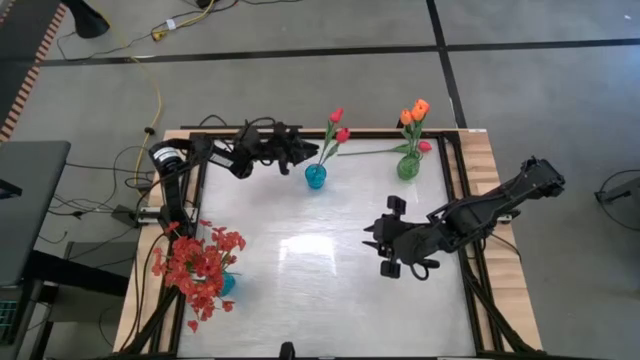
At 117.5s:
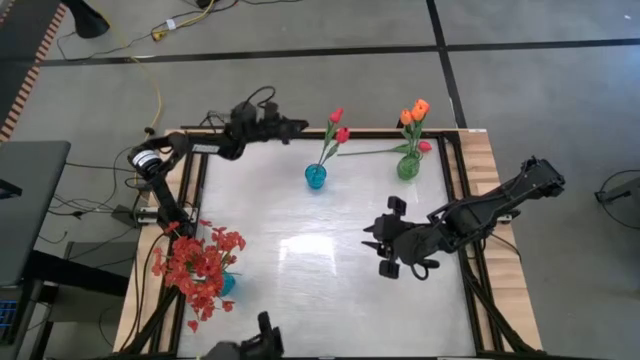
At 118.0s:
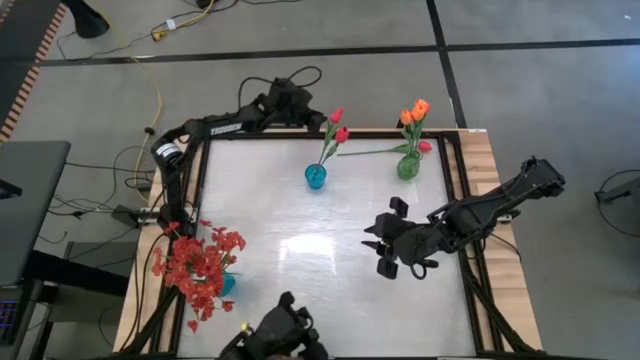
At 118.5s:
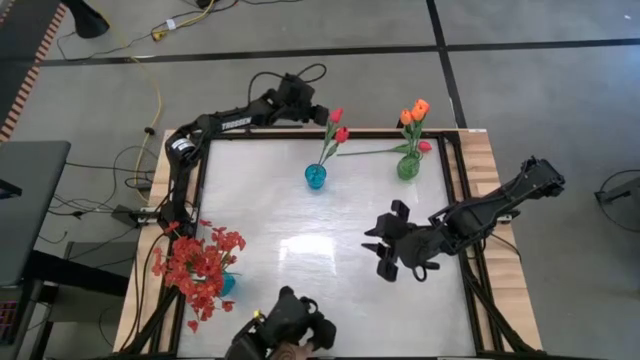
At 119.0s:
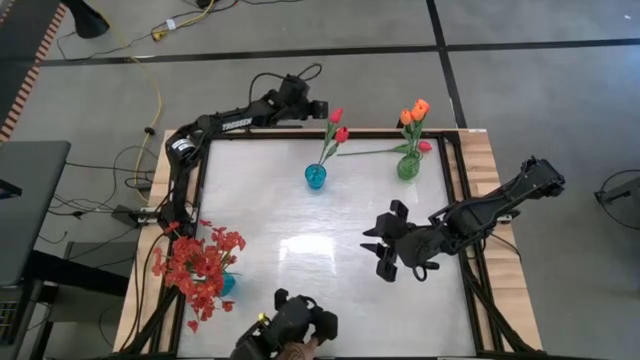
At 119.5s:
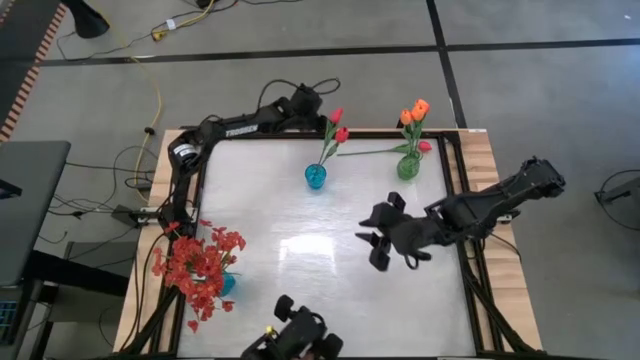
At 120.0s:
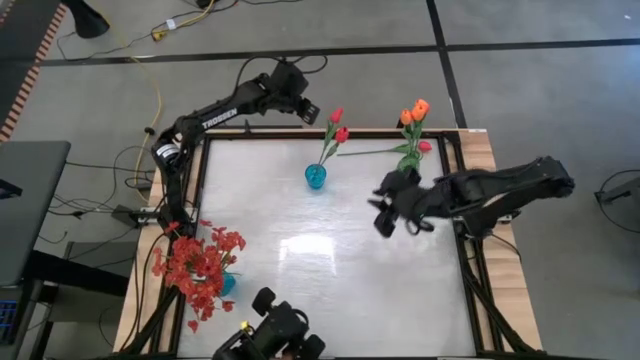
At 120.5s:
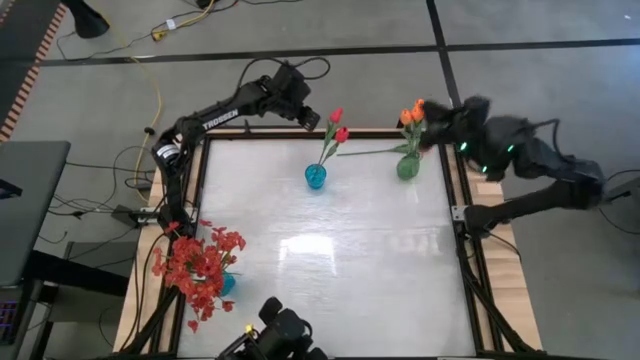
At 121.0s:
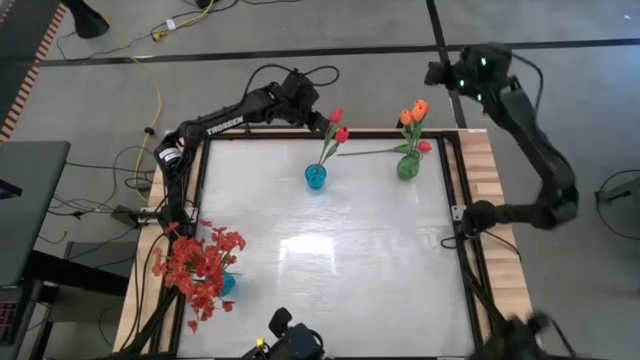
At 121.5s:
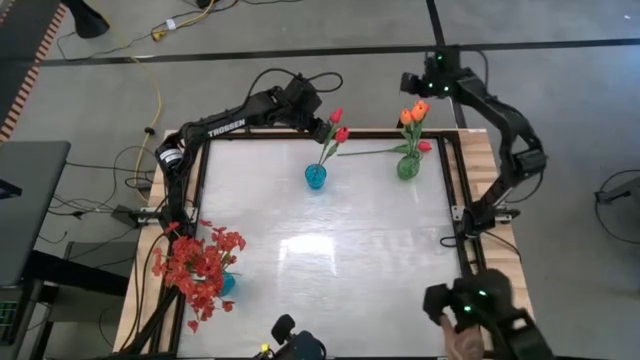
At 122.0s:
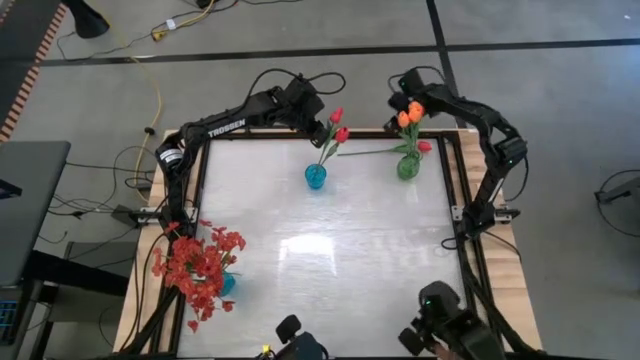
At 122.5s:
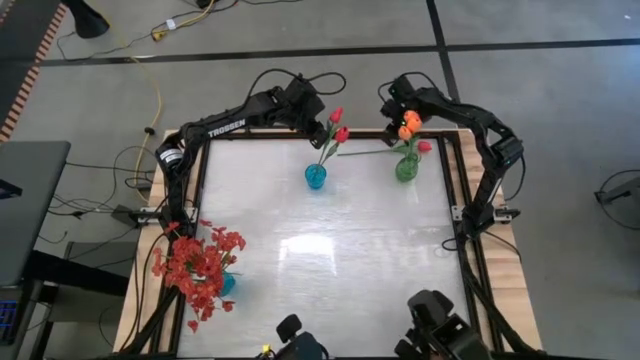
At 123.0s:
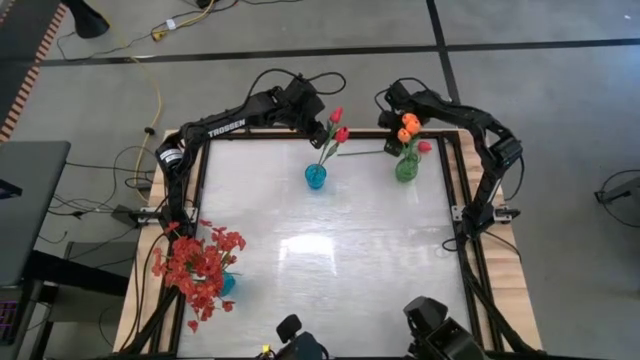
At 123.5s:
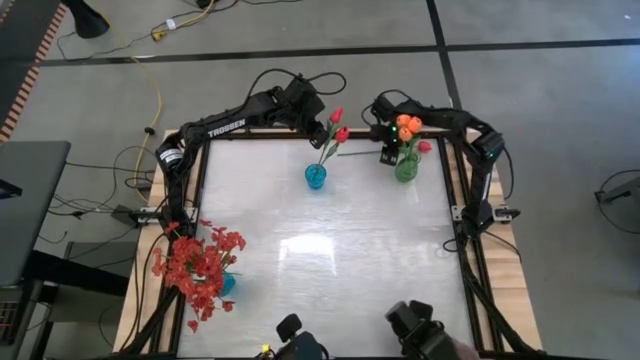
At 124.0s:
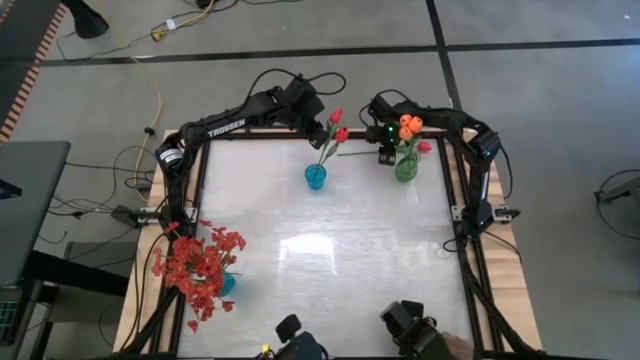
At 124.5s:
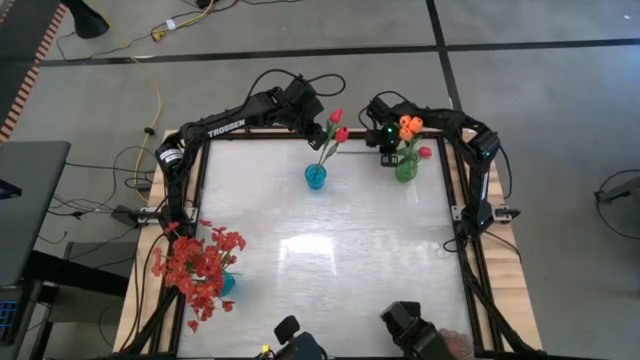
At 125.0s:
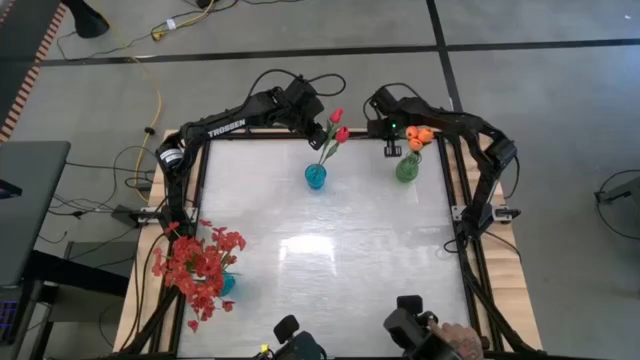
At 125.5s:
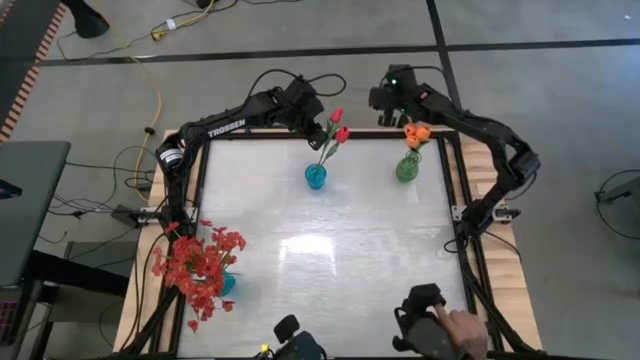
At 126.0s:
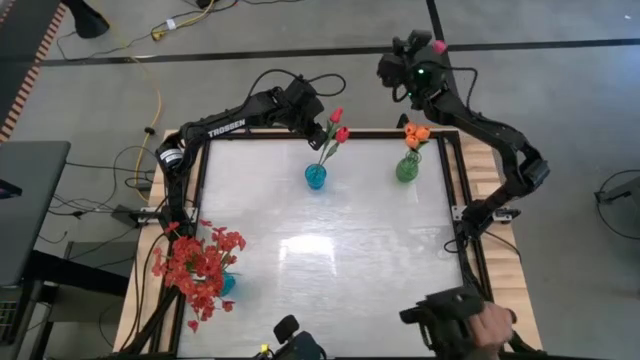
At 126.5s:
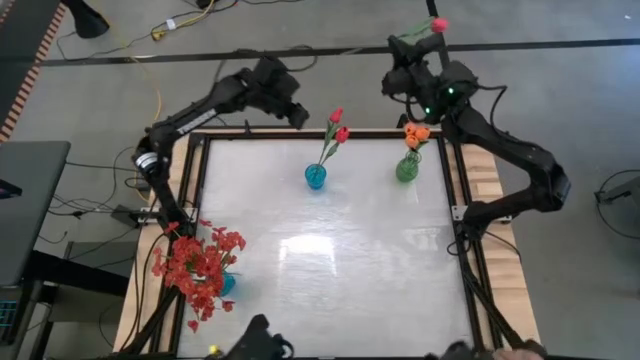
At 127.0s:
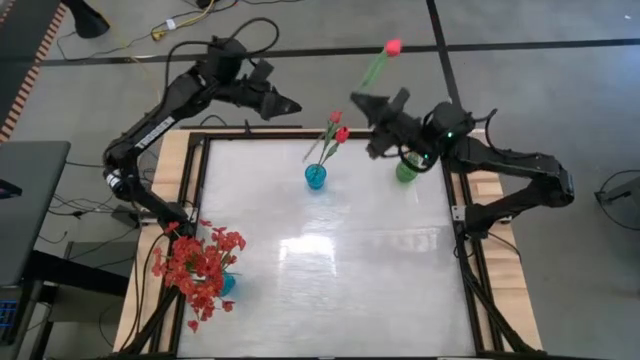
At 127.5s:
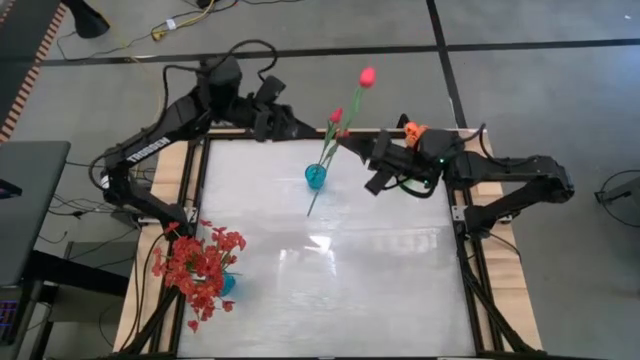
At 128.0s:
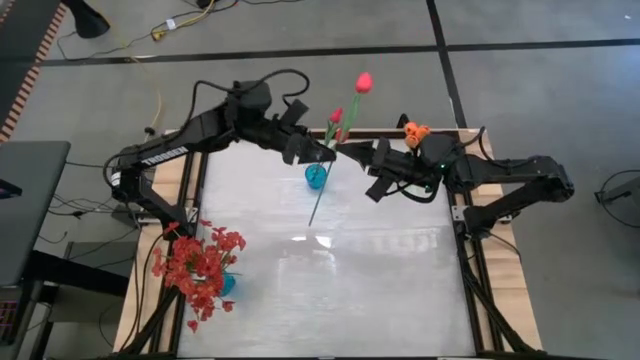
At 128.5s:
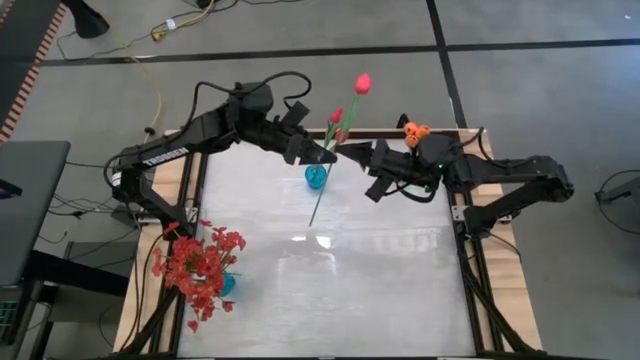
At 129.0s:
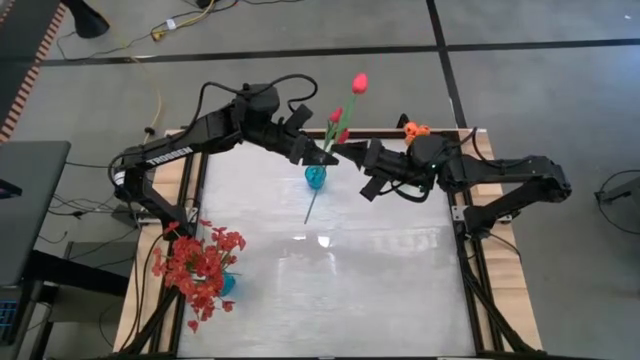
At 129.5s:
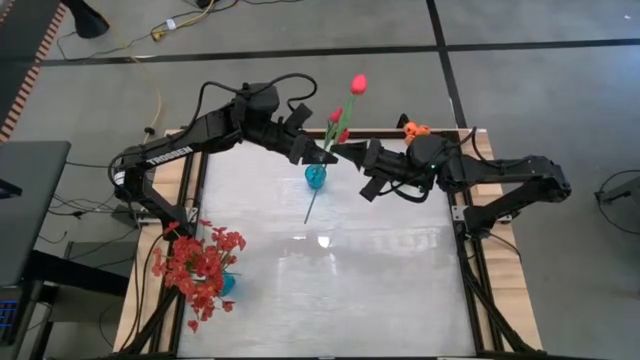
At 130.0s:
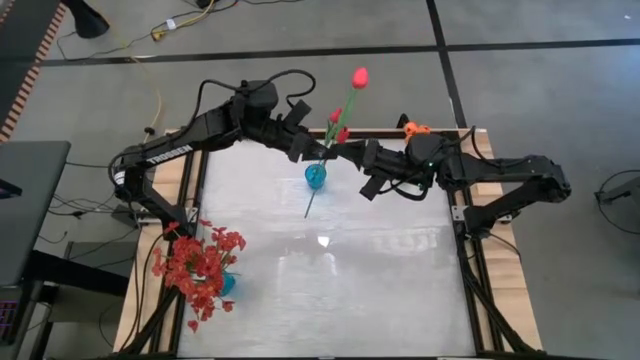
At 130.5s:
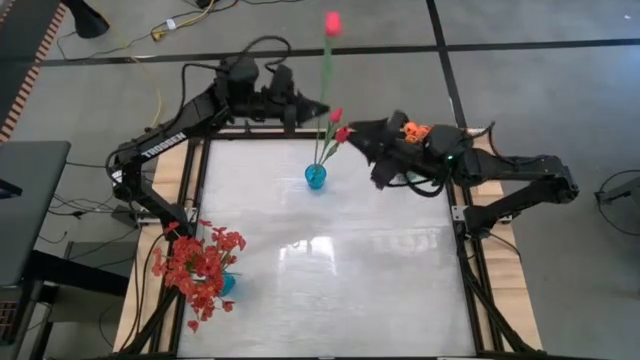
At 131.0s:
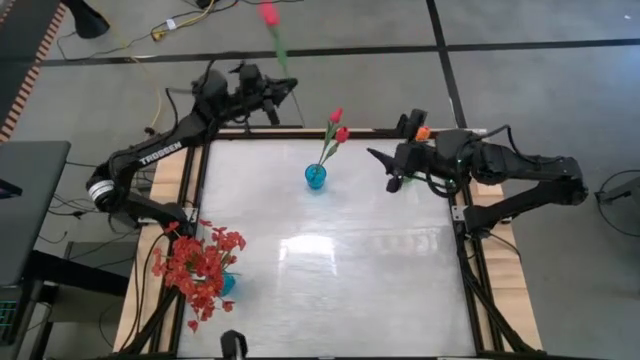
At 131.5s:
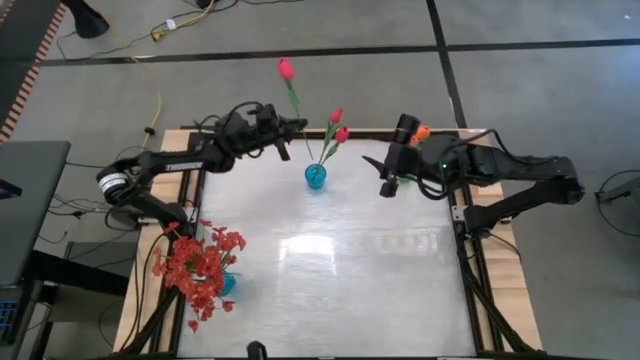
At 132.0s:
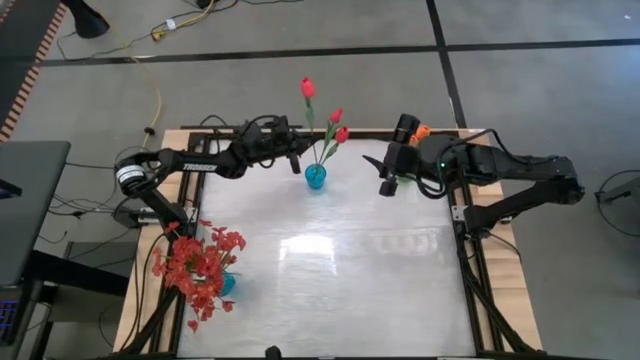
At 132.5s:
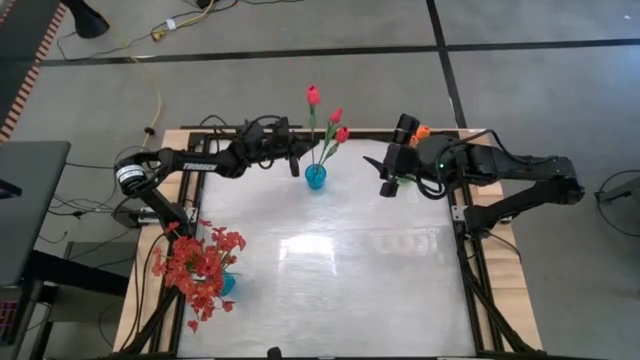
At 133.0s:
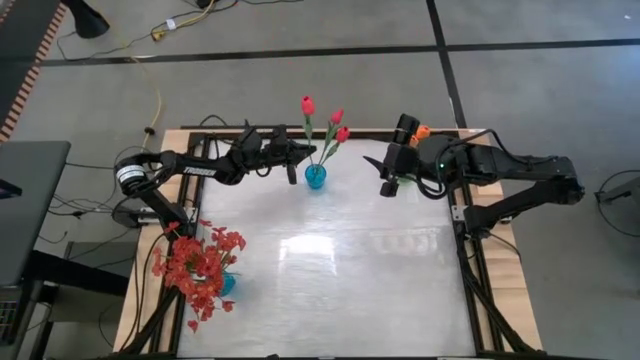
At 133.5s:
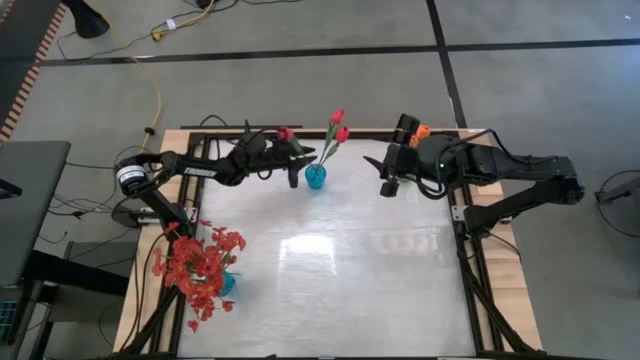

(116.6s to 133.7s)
Task: Sort flowers into vase by color
Put the red tulip into the top blue vase

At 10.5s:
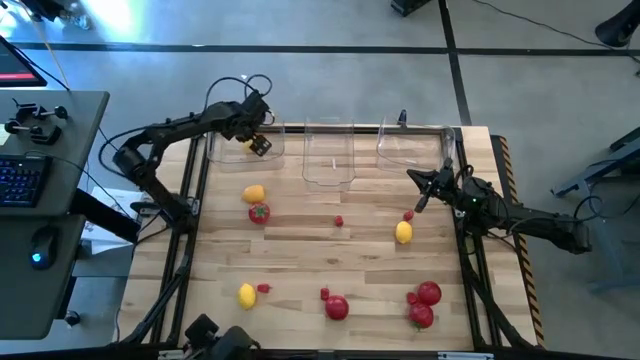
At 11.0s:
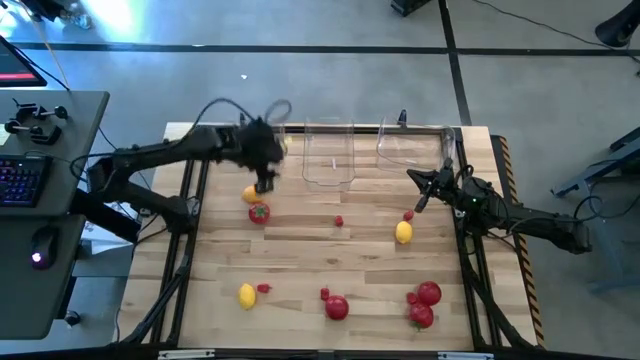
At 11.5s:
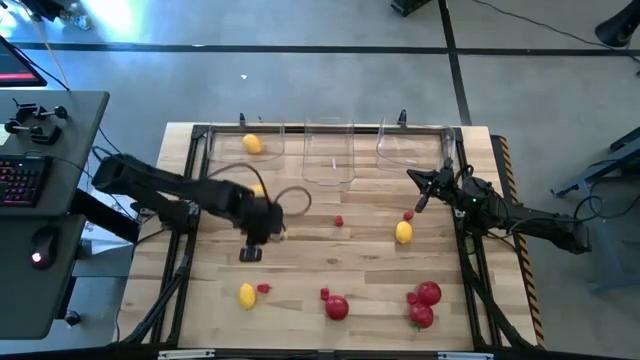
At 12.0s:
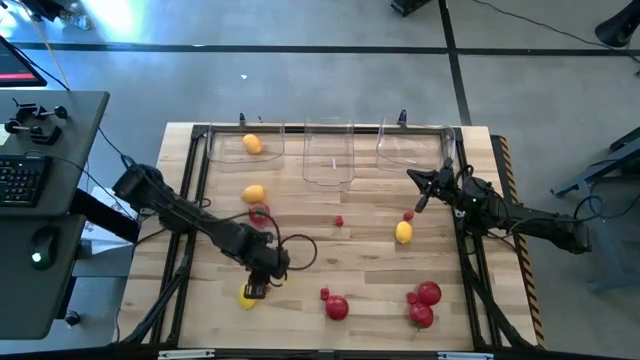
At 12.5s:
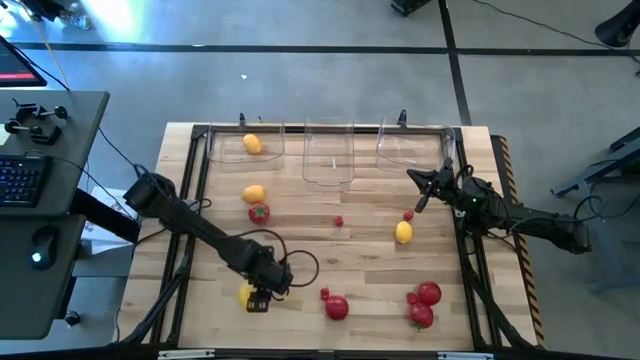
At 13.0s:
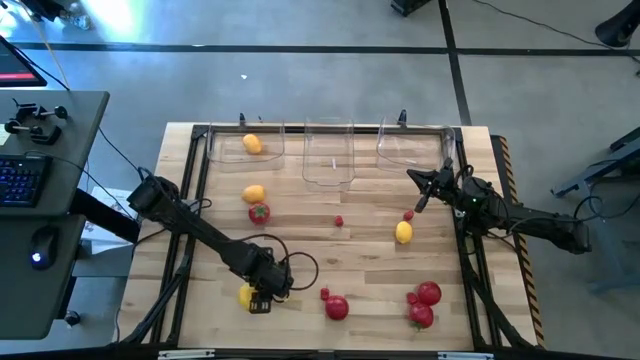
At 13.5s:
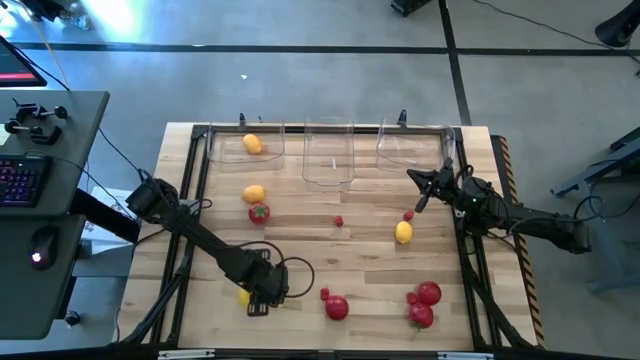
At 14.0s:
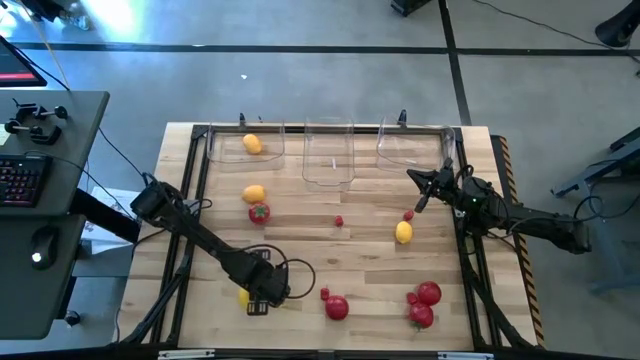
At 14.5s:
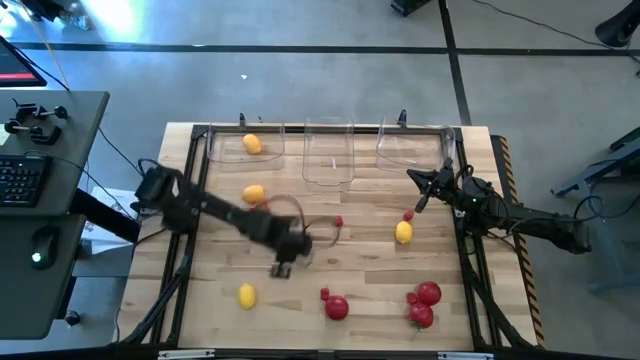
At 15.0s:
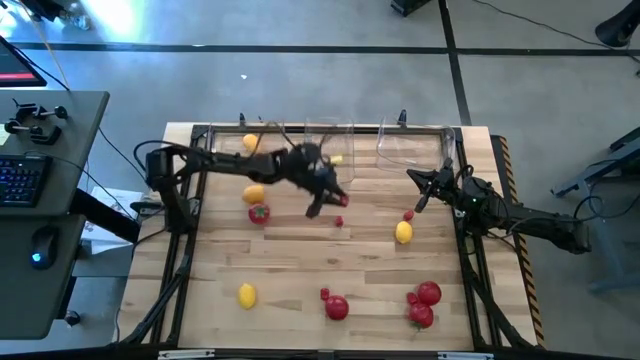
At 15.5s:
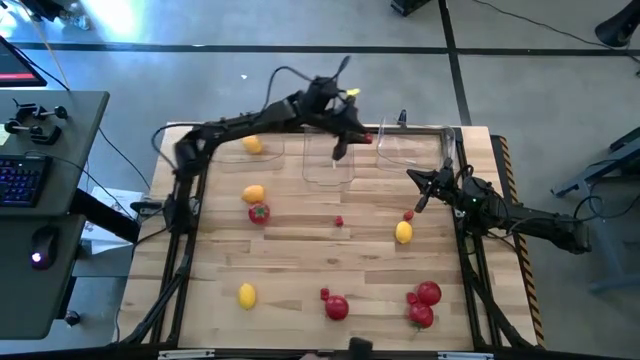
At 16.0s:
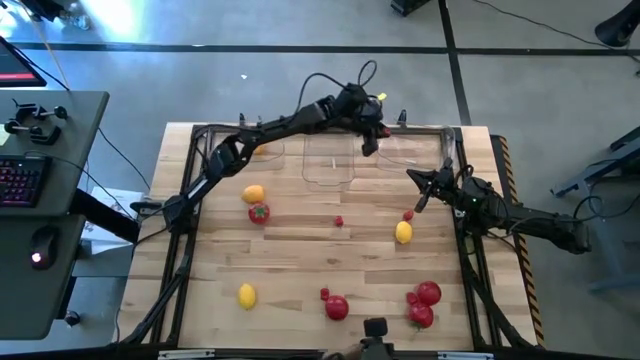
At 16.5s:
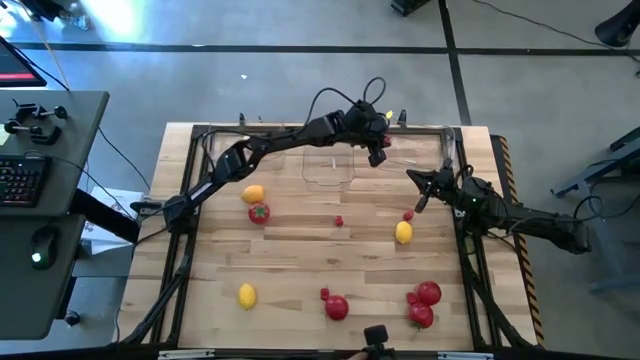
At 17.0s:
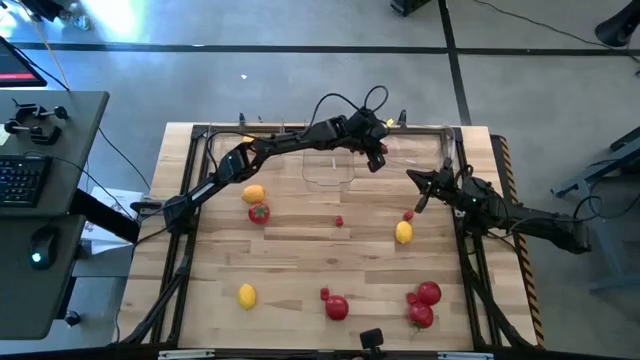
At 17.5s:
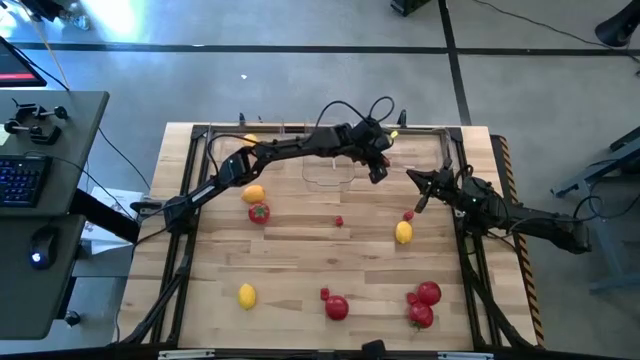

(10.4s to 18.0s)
Task: Sort produce into baskets
Put the chili pepper into the right transparent bin
